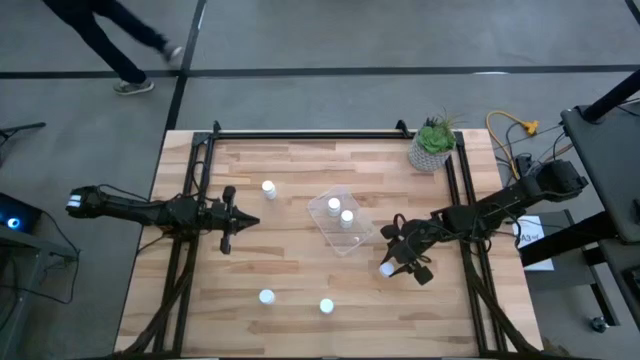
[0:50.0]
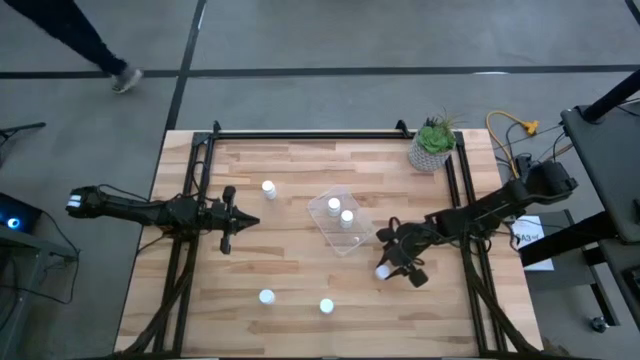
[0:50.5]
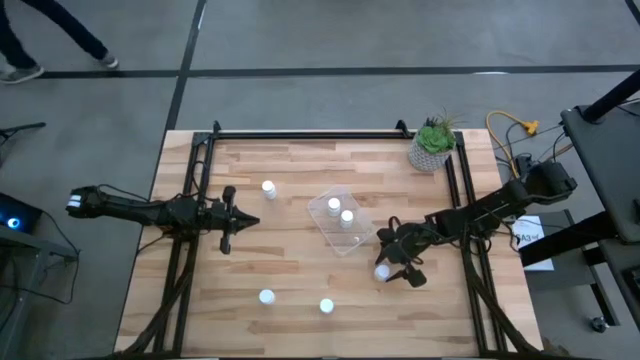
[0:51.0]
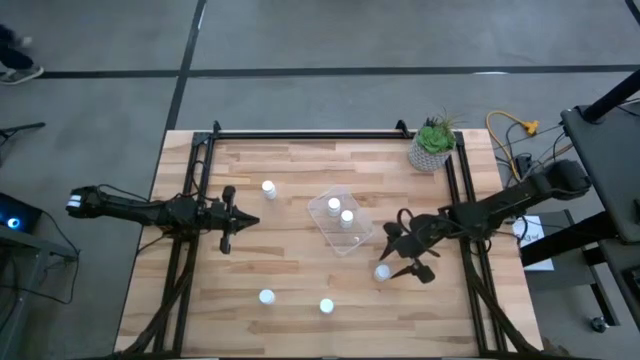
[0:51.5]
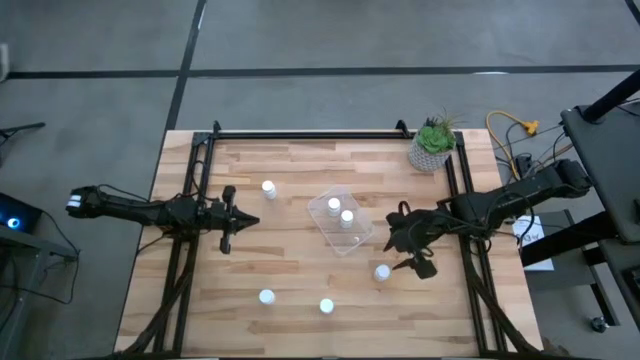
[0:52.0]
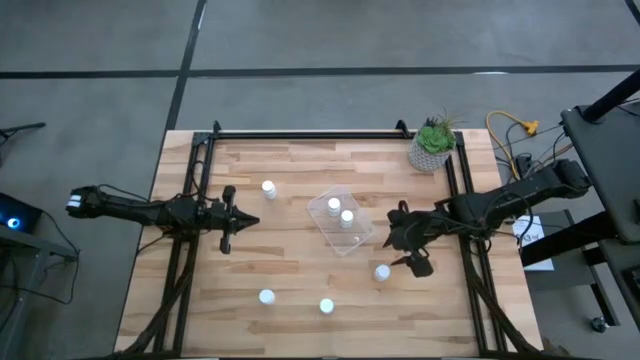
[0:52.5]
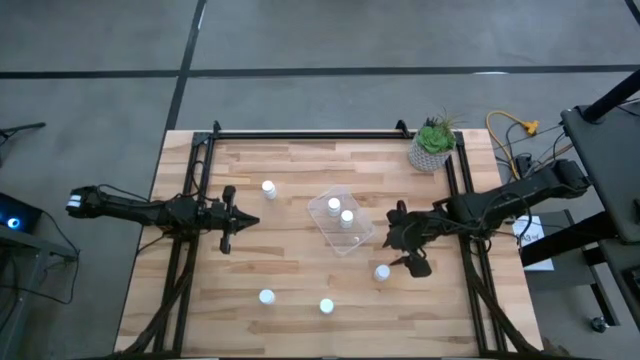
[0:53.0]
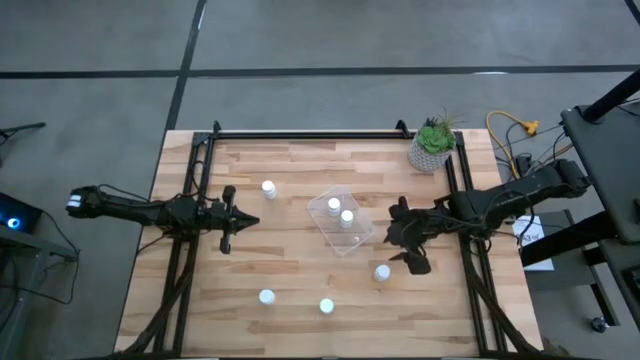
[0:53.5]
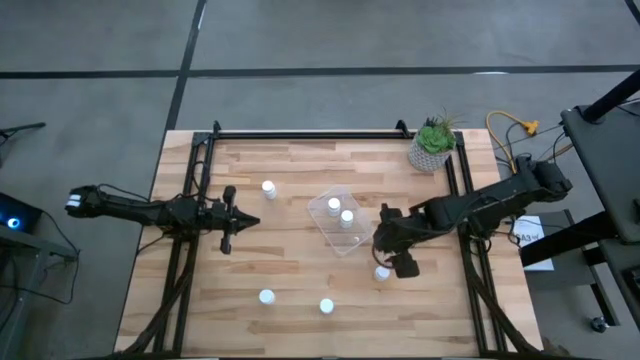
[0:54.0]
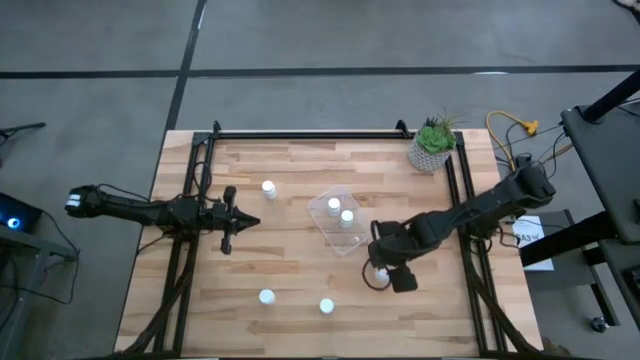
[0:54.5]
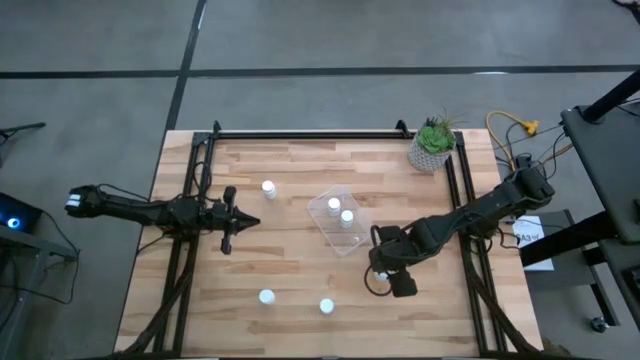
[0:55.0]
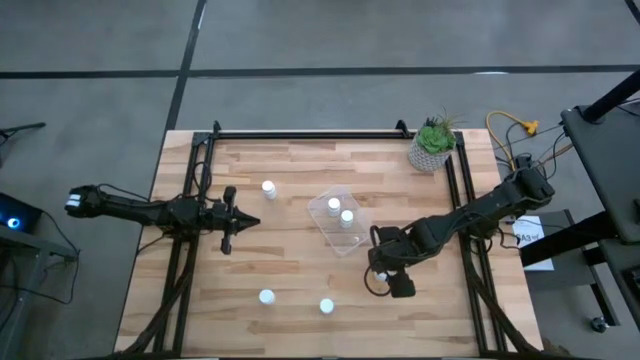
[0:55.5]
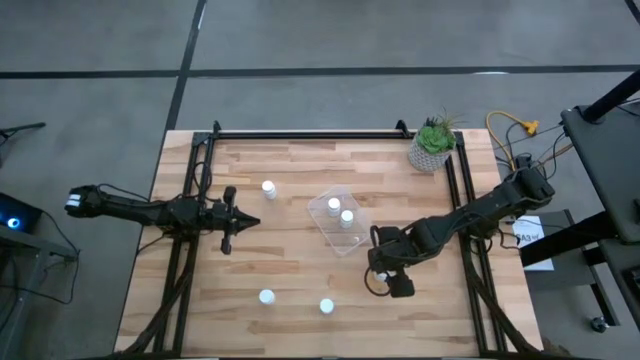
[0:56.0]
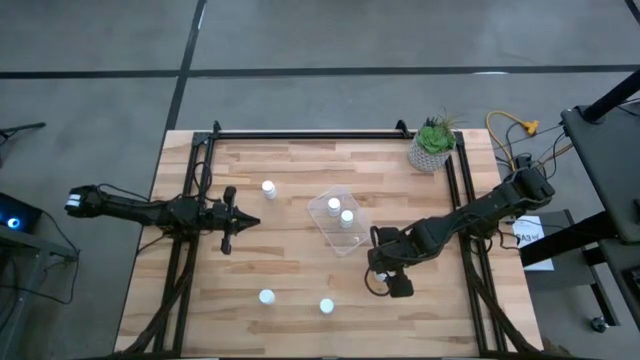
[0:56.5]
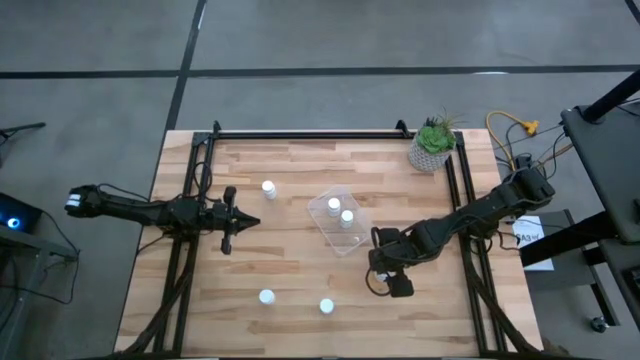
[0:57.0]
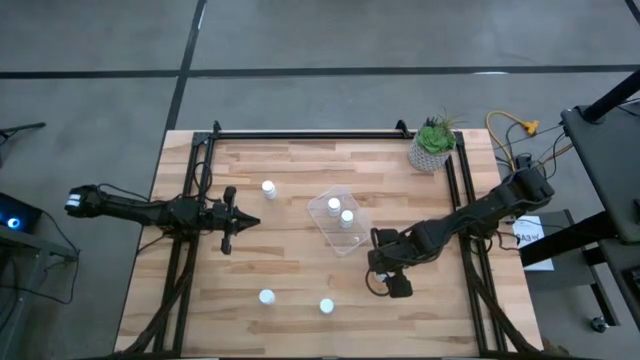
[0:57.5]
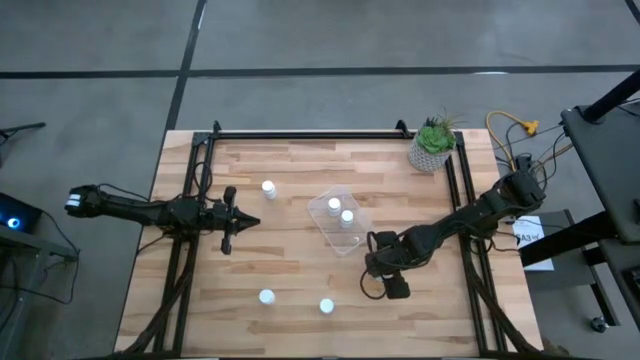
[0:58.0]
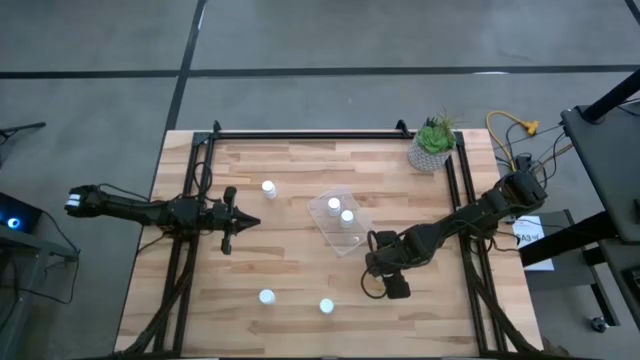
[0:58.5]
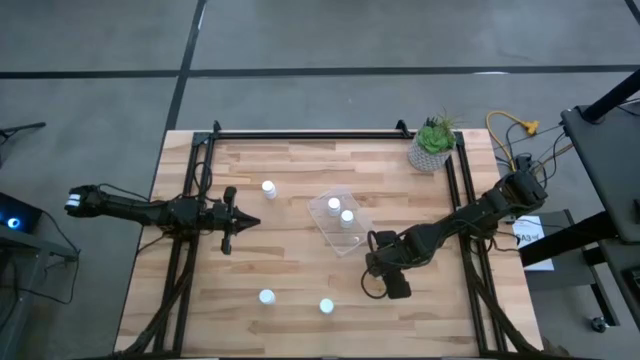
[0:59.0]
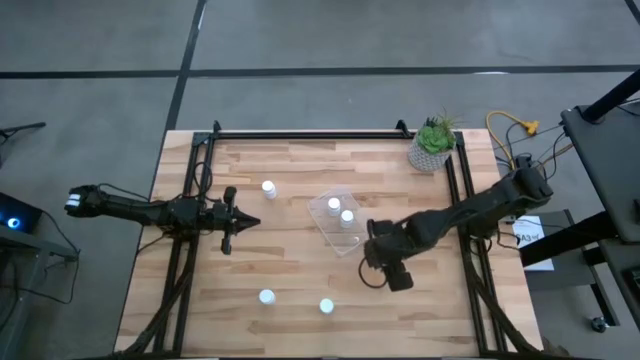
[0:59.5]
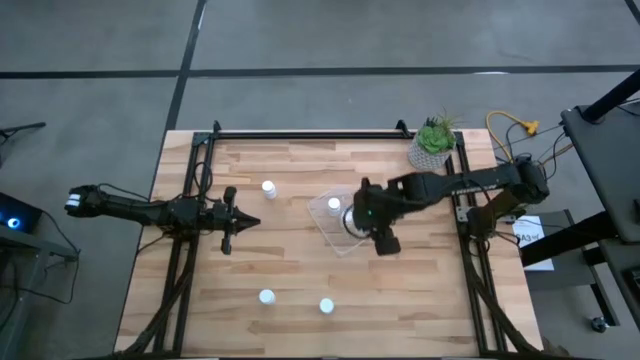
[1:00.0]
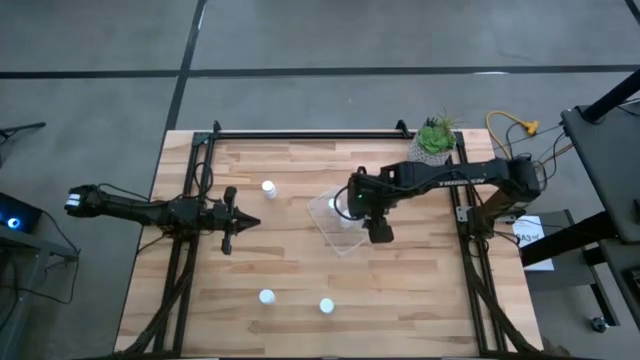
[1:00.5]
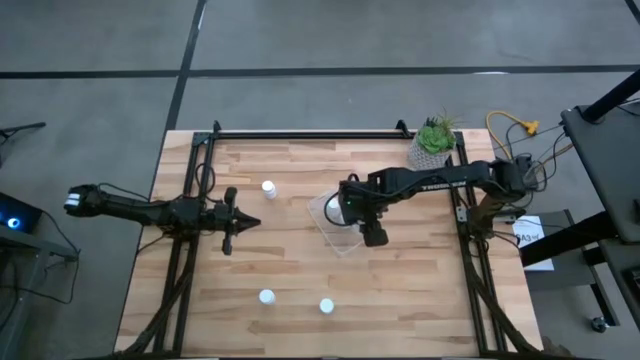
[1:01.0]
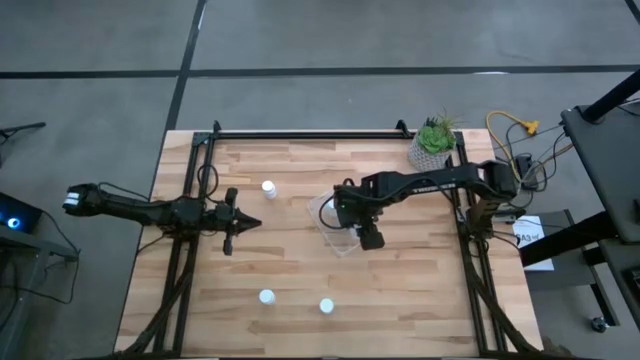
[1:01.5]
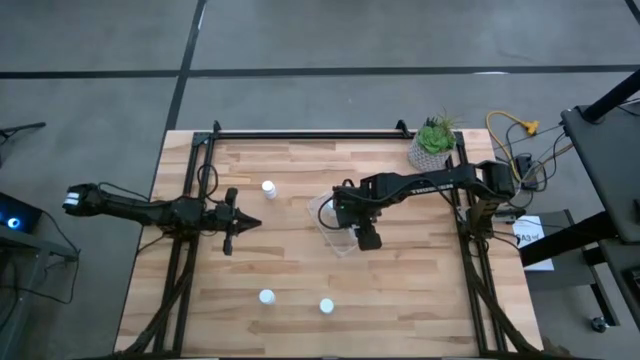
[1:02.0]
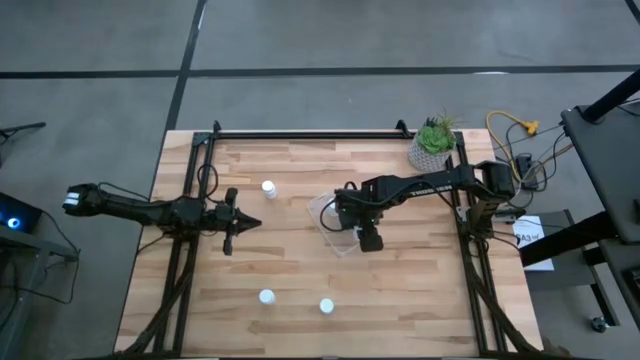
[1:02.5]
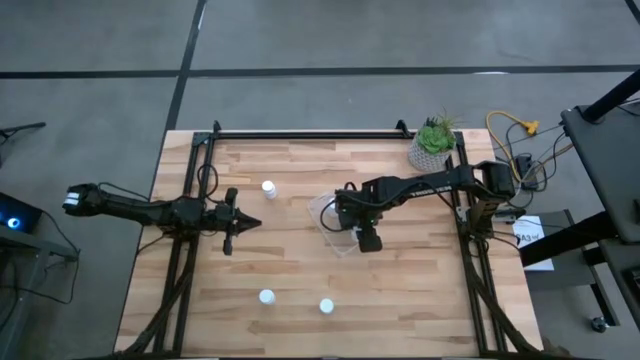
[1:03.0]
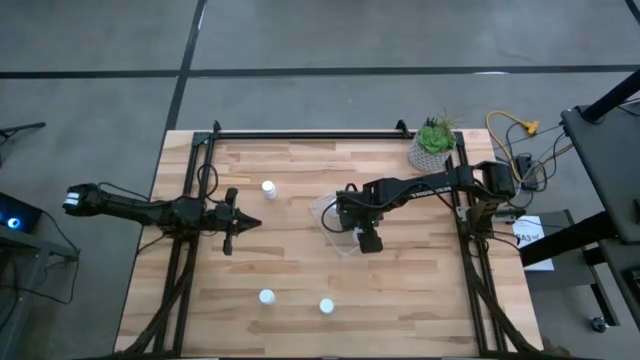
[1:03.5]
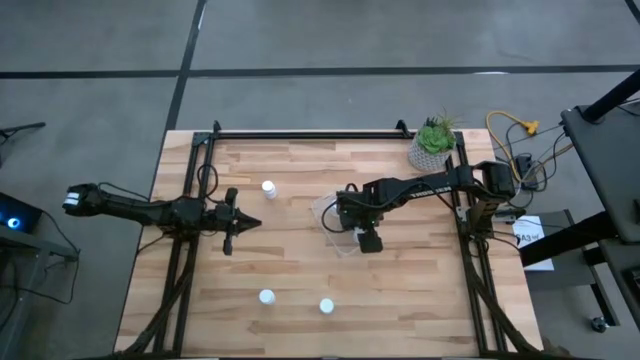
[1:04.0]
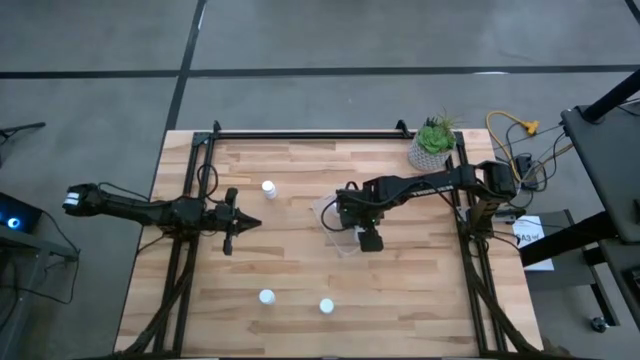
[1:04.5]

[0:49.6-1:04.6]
Task: Pick and place pill bottles into a basket
Put the white pill bottle into the transparent bin

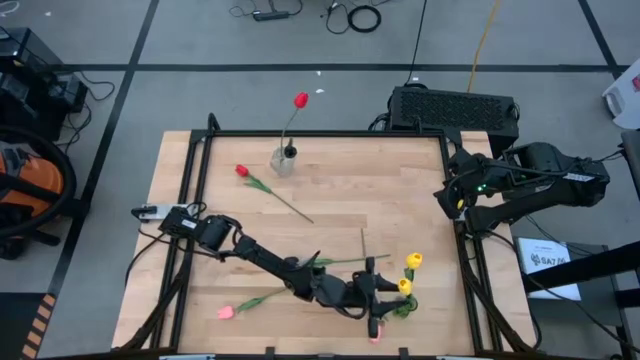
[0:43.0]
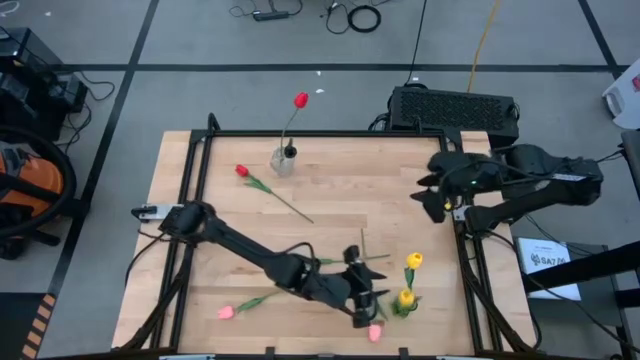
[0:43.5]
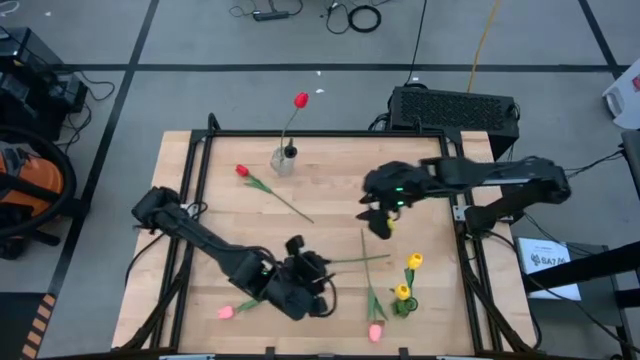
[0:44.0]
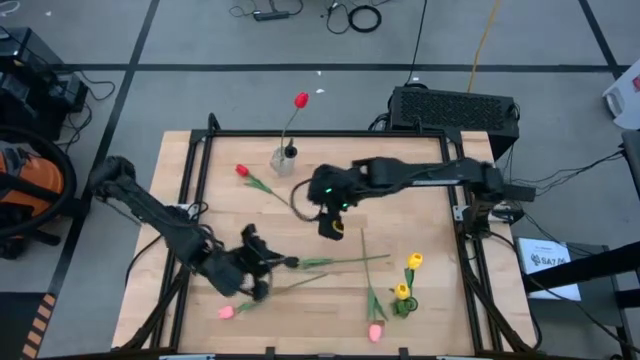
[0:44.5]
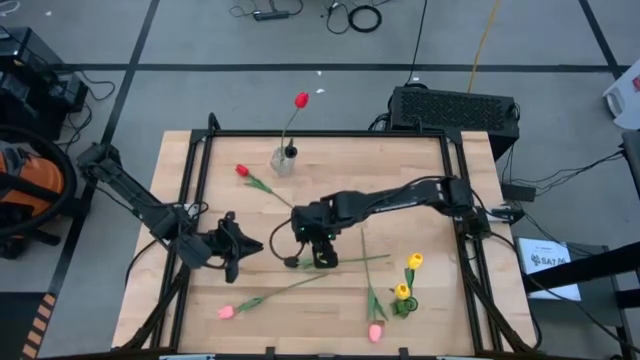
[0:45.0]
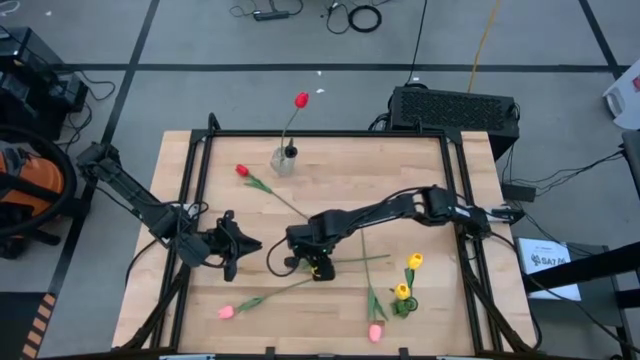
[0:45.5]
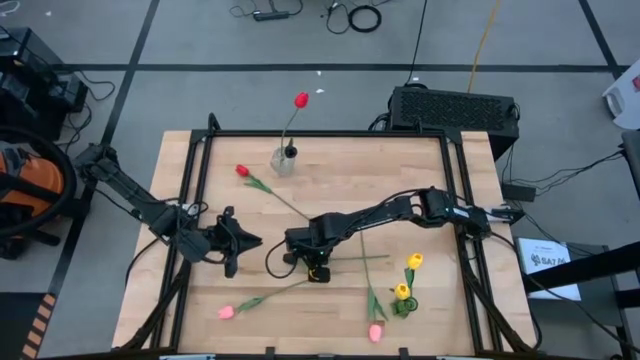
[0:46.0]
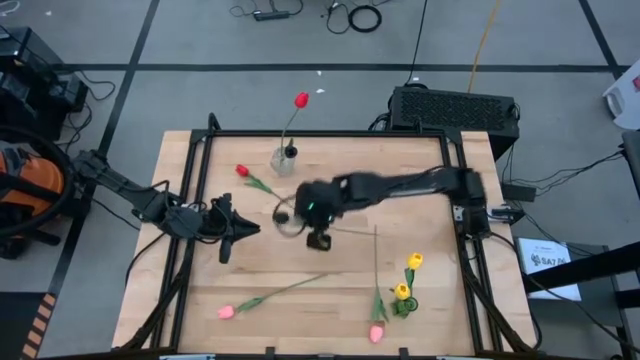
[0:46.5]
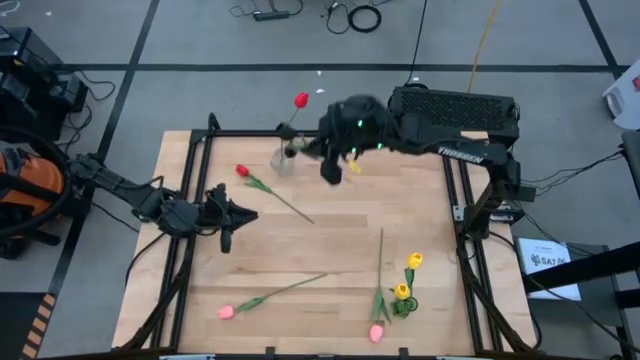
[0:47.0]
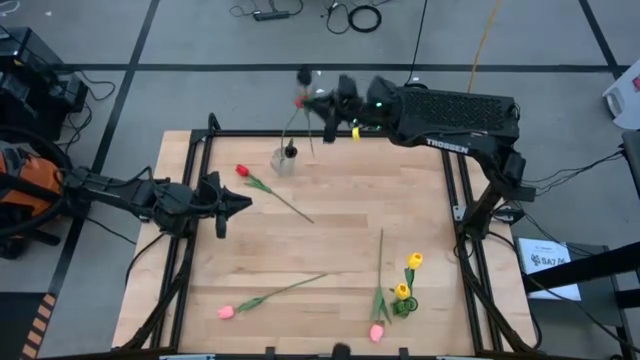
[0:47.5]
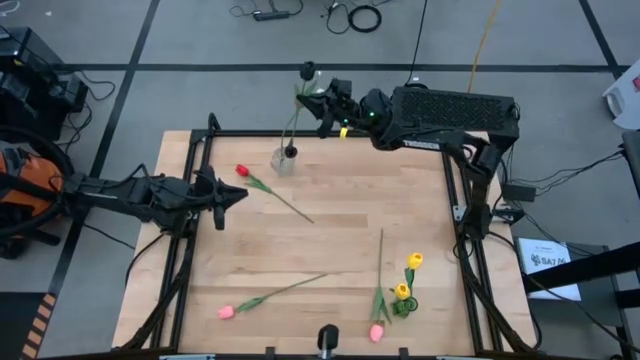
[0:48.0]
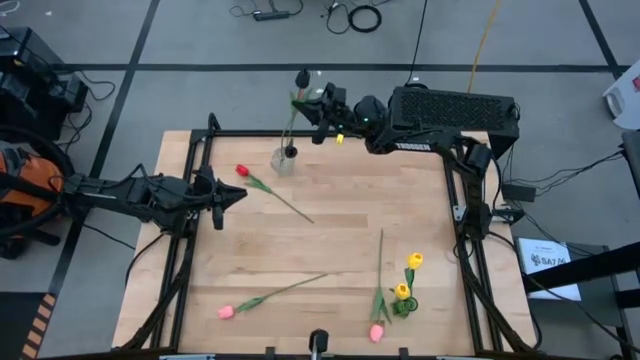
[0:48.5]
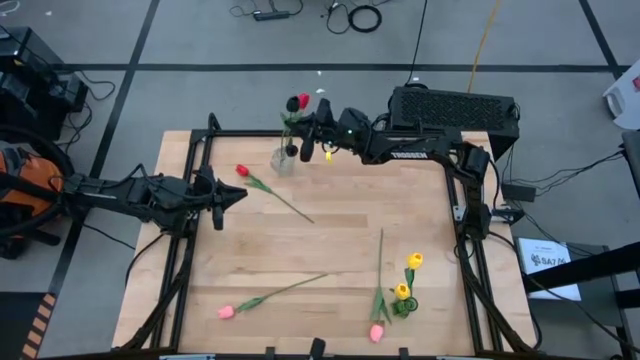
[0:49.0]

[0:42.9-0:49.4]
Task: Sort flowers into vase by color
Put the black tulip into the transparent flower vase
